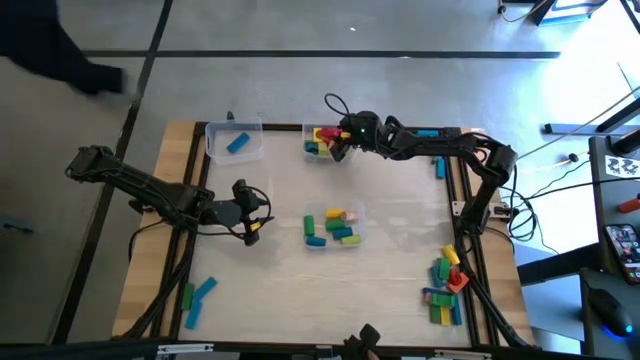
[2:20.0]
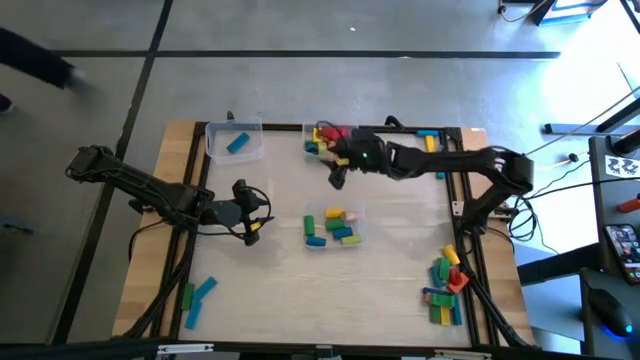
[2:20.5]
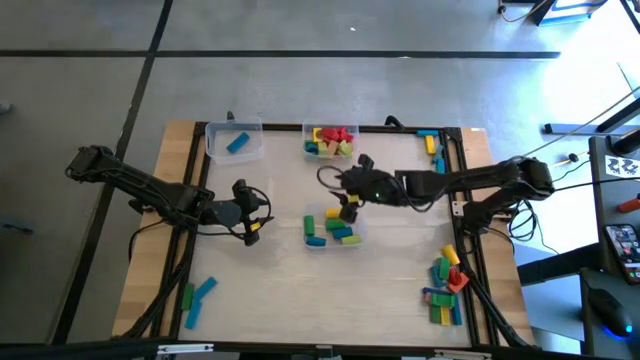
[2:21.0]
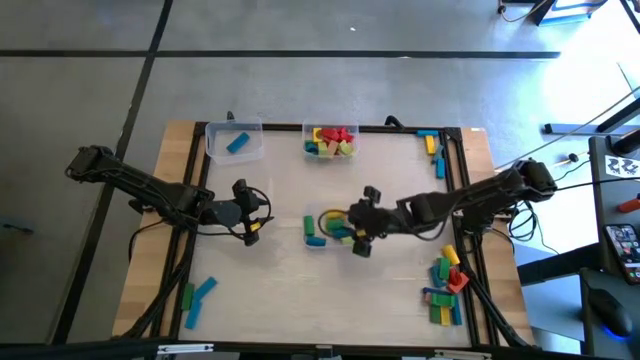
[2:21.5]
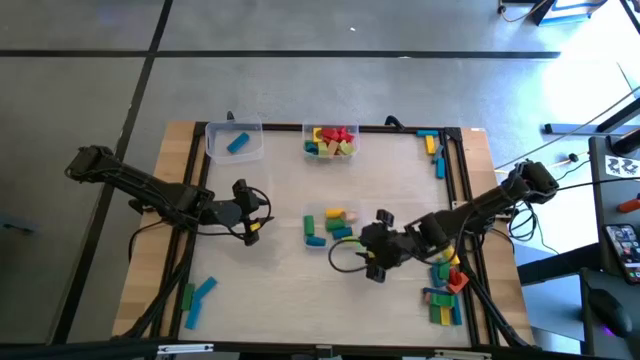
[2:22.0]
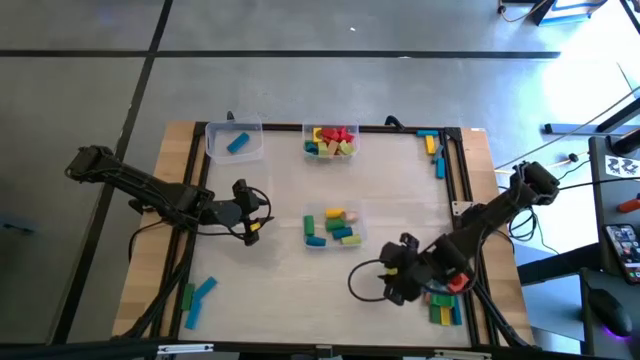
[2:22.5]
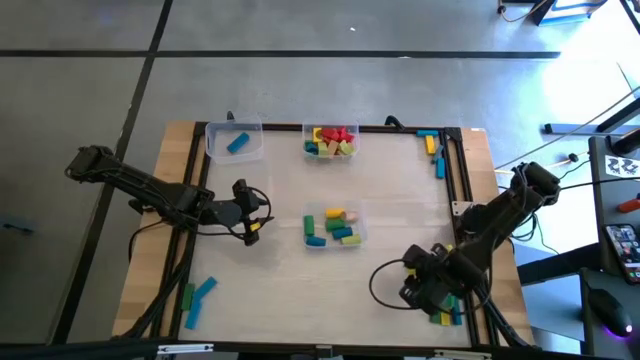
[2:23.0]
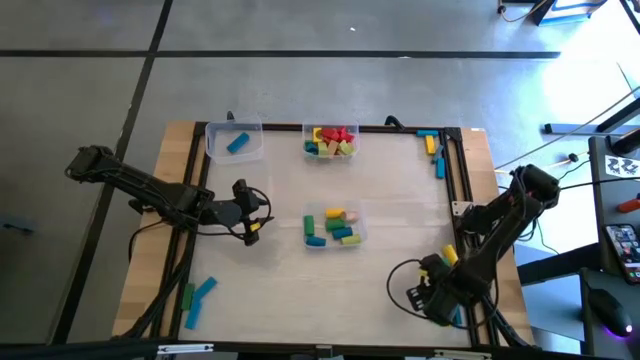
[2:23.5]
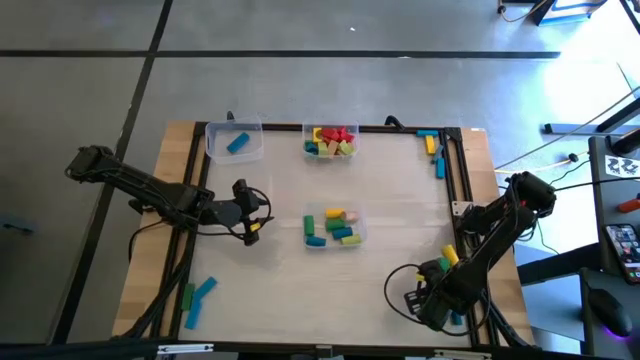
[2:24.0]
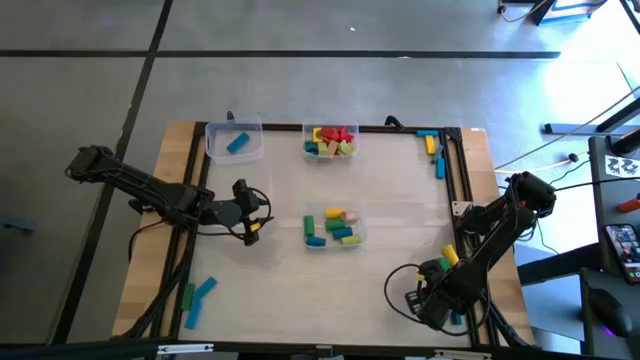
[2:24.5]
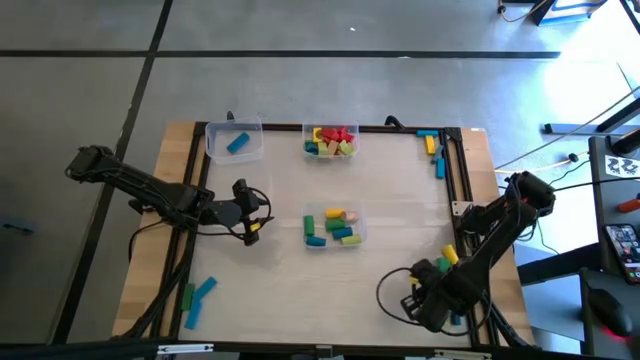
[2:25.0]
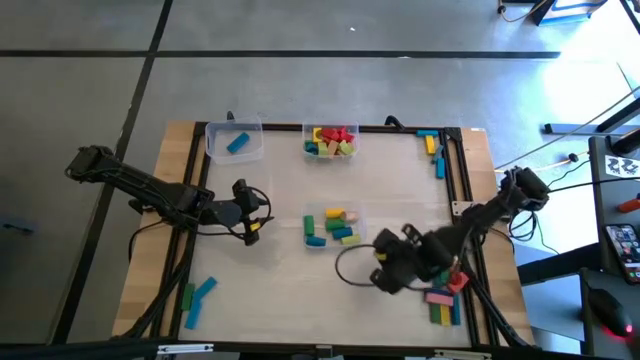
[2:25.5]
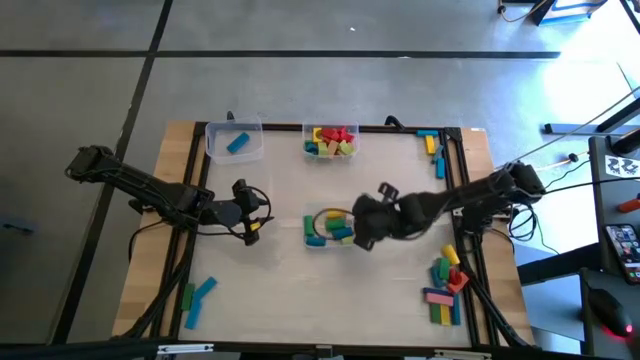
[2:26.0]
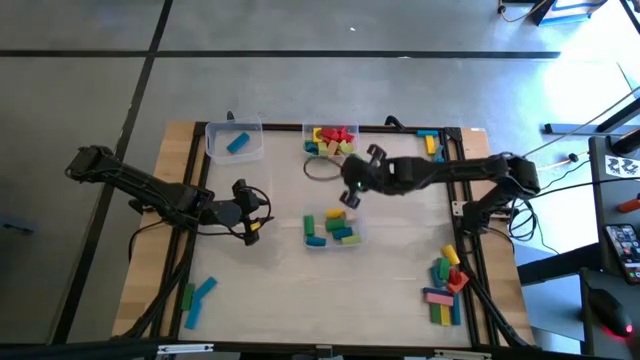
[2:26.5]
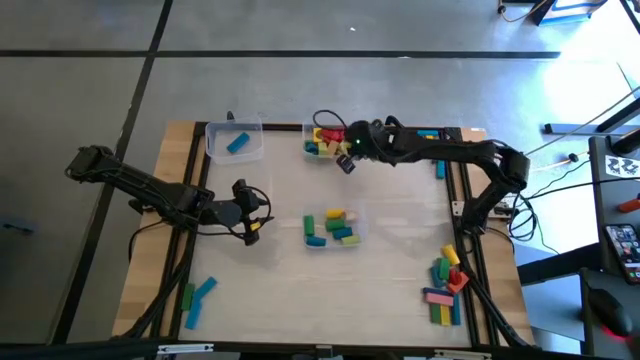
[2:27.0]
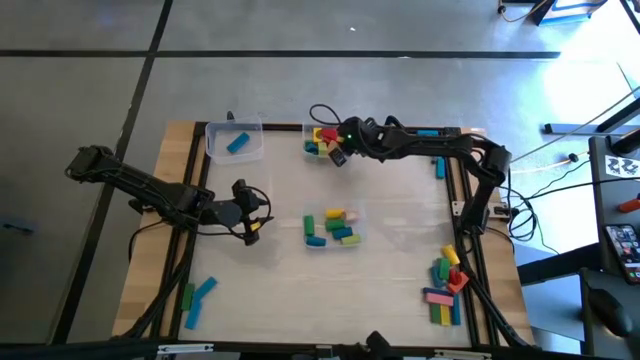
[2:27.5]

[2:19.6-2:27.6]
Task: Sort blocks by size
Put the green arch block into the top right transparent bin

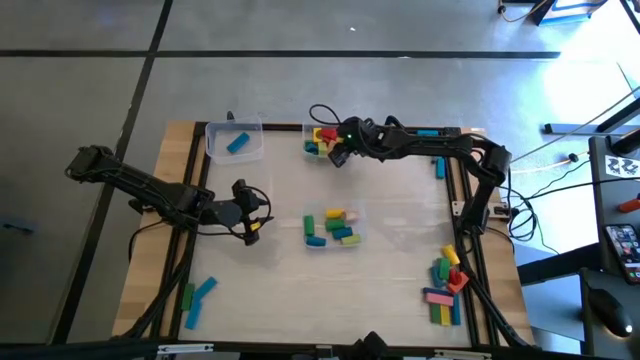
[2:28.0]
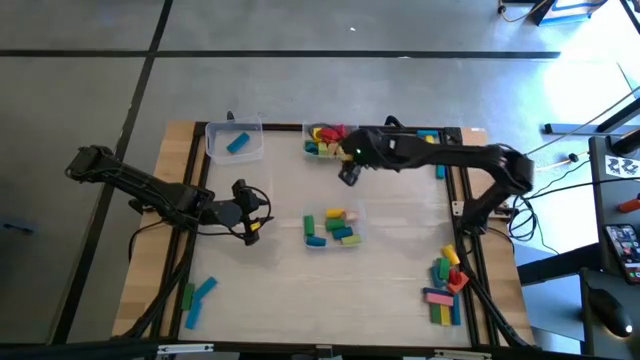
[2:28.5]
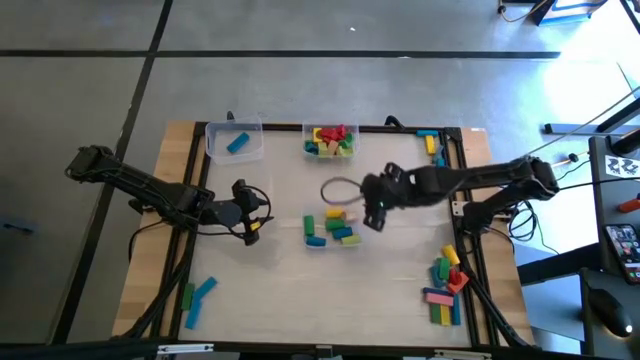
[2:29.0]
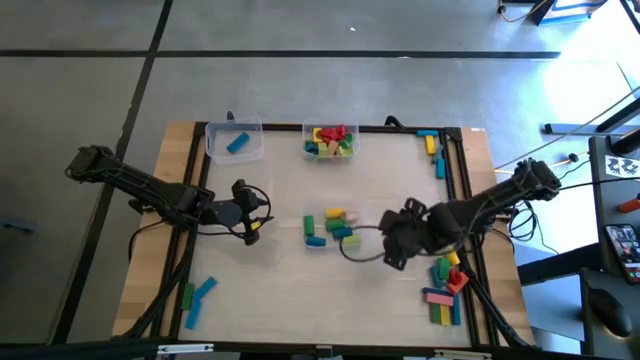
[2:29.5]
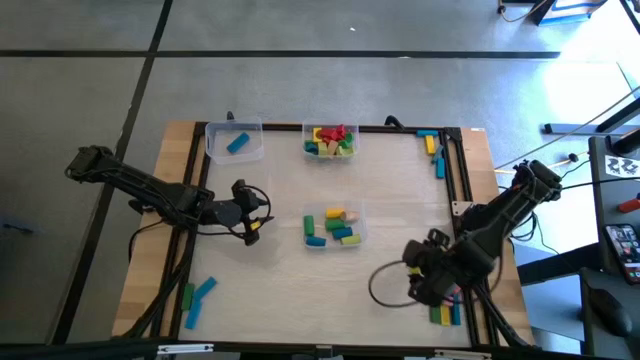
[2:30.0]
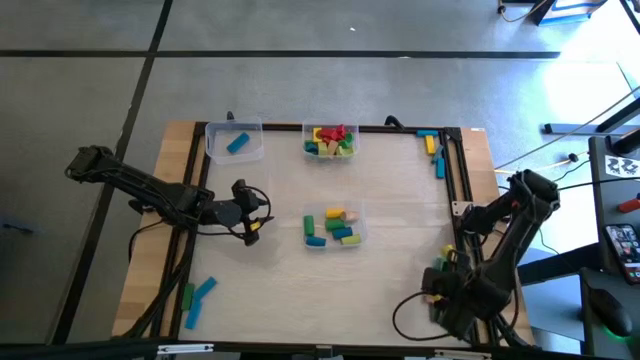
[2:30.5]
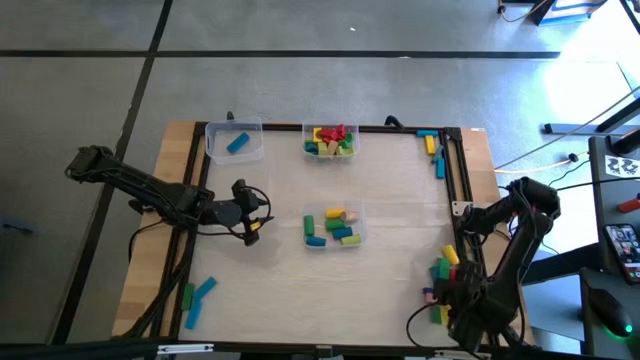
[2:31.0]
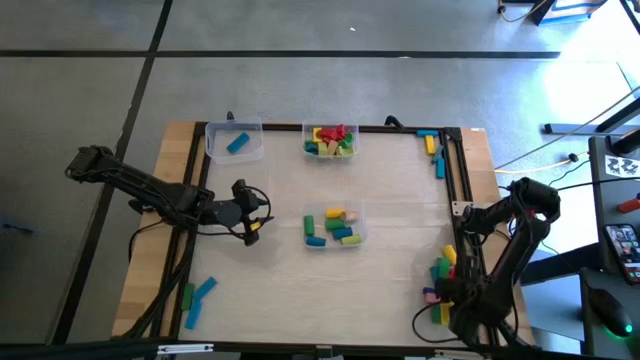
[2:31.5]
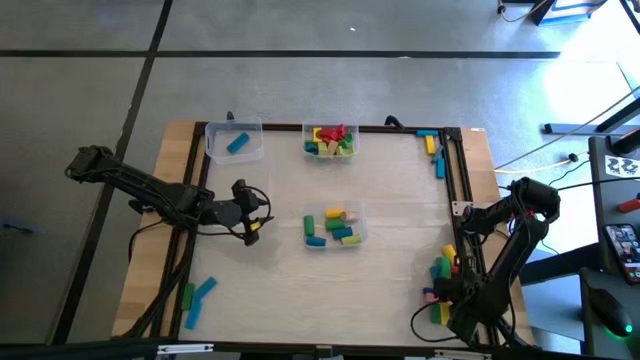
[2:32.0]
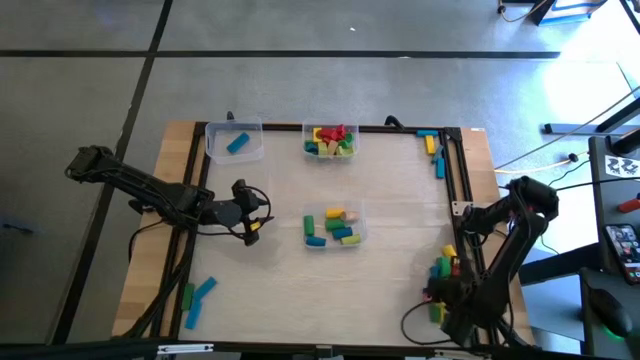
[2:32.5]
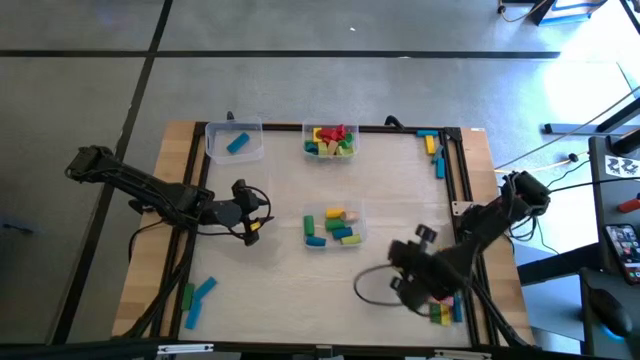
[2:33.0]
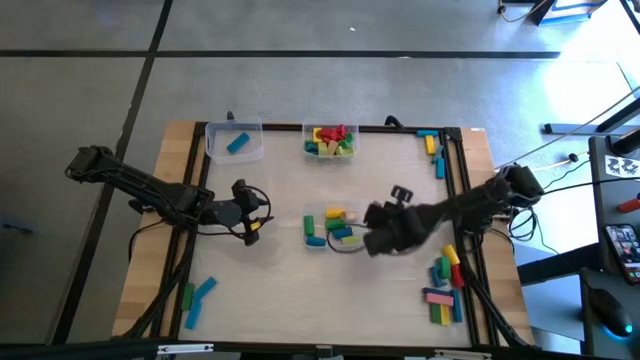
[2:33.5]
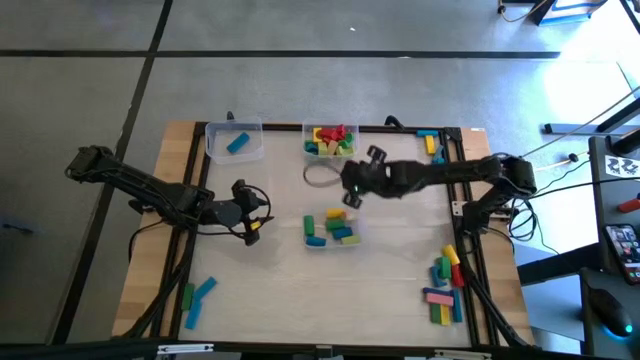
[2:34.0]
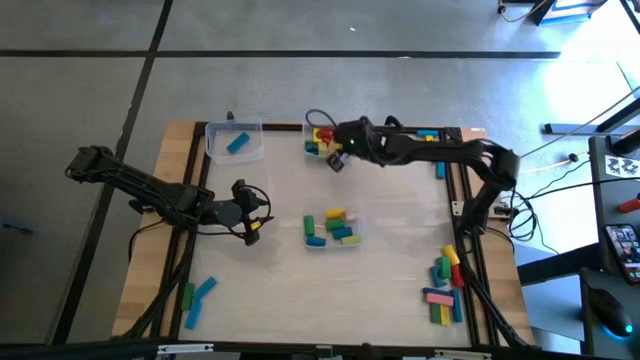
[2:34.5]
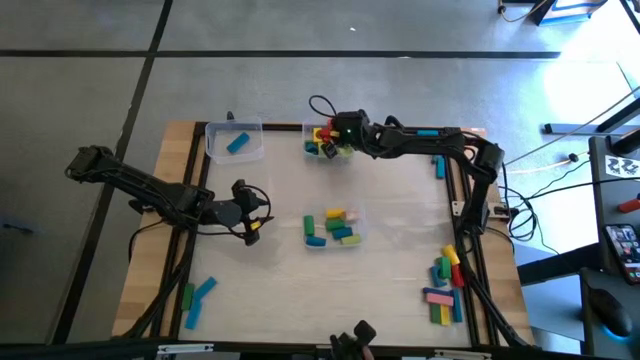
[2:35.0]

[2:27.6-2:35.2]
Put the orange arch block into the top right transparent bin

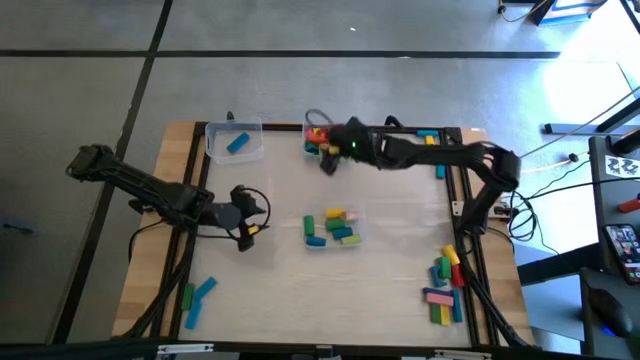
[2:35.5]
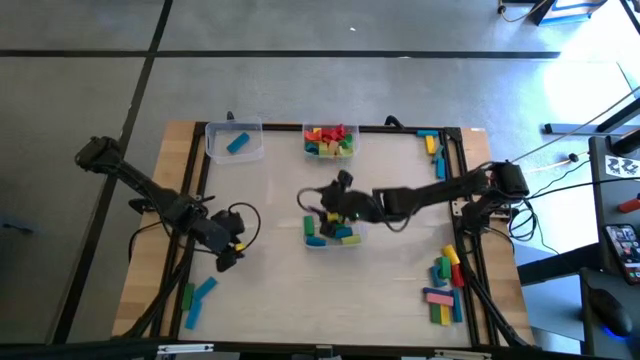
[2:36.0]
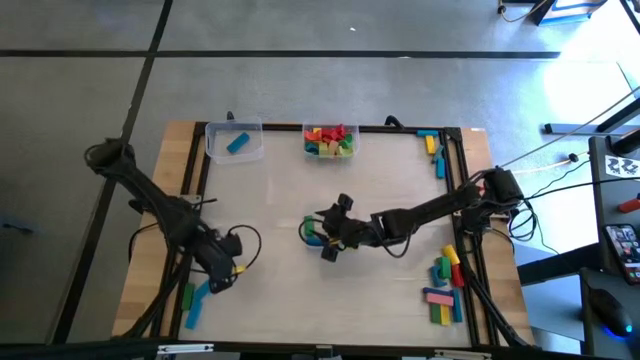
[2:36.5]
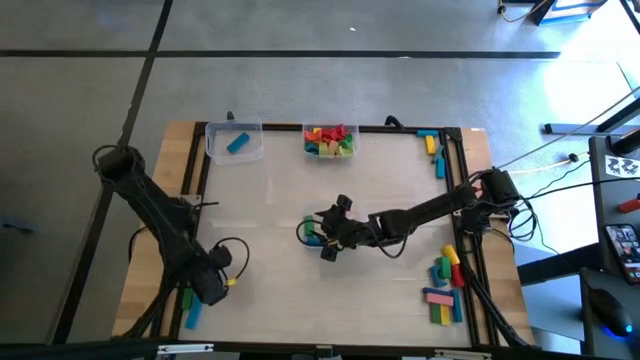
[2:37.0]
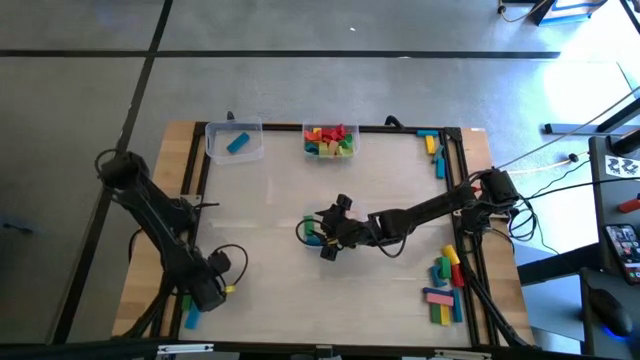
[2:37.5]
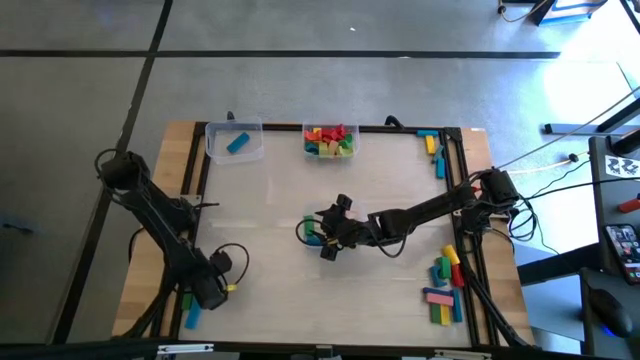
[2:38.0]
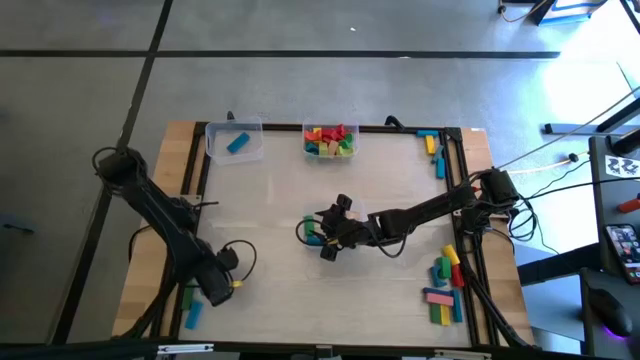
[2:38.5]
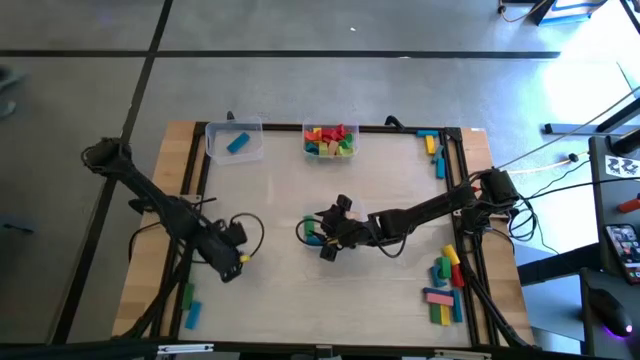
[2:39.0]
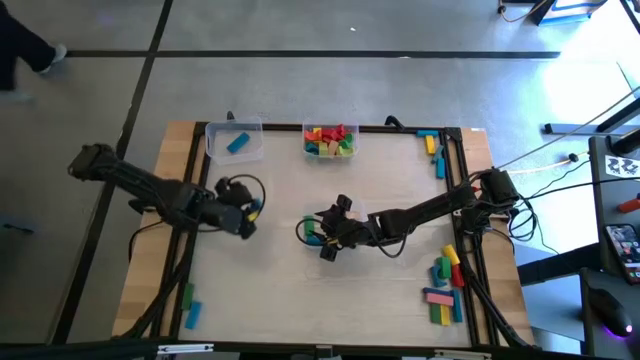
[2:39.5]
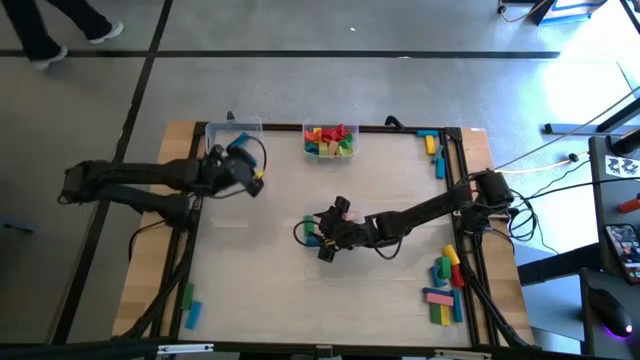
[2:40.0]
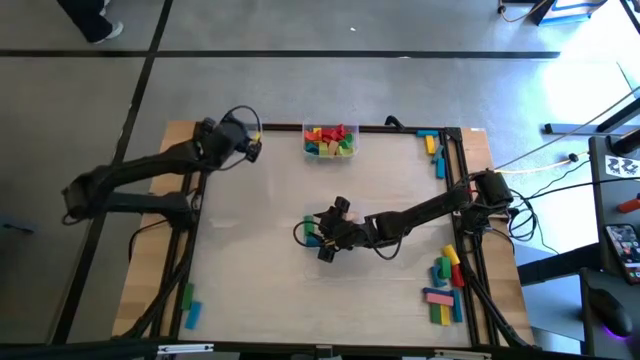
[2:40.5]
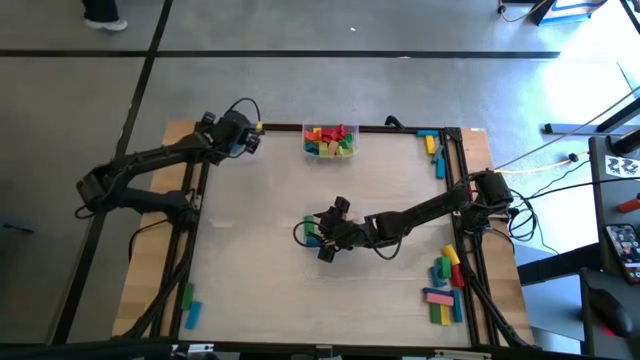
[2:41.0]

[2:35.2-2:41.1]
Put the blue rectangular block into the top left transparent bin
